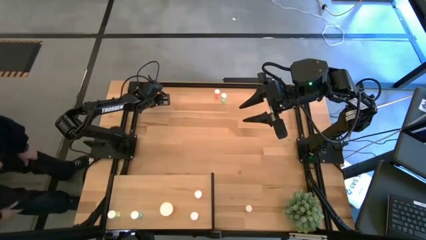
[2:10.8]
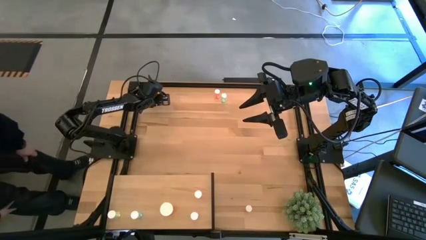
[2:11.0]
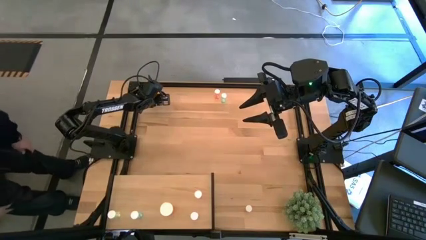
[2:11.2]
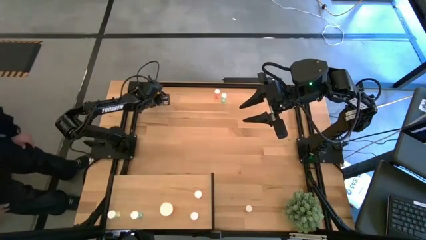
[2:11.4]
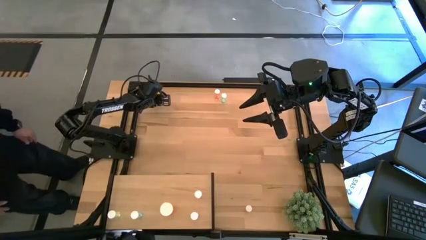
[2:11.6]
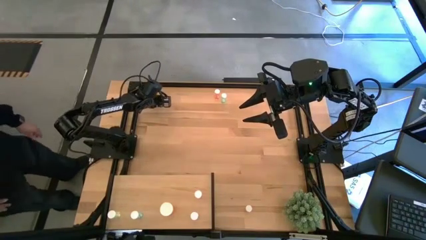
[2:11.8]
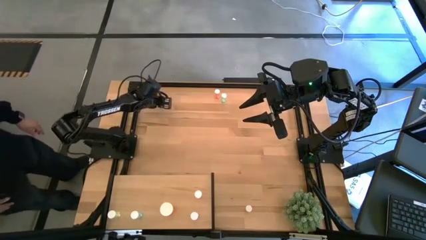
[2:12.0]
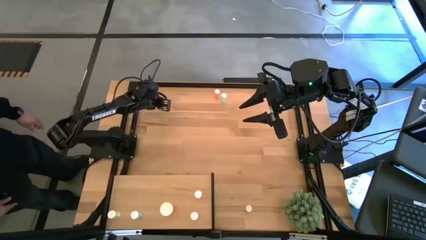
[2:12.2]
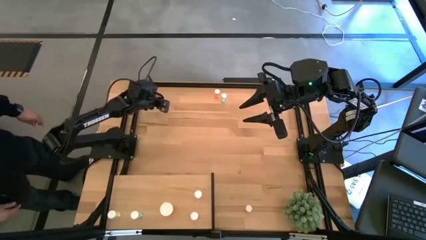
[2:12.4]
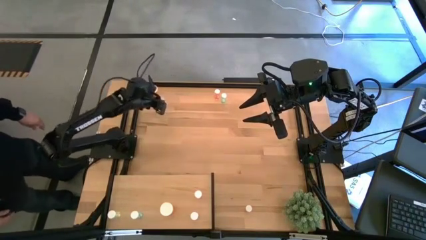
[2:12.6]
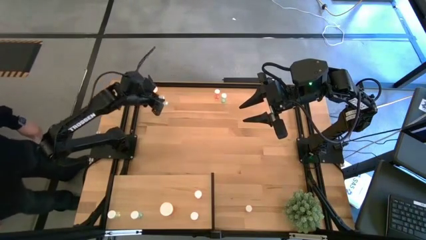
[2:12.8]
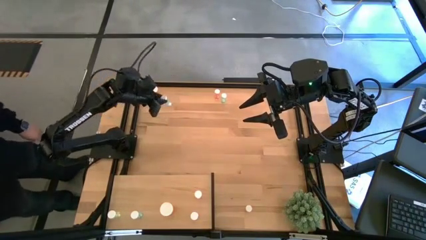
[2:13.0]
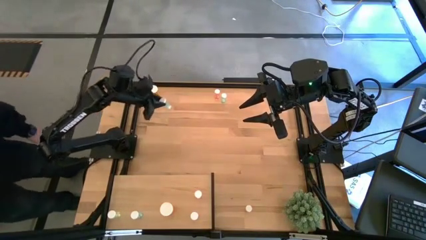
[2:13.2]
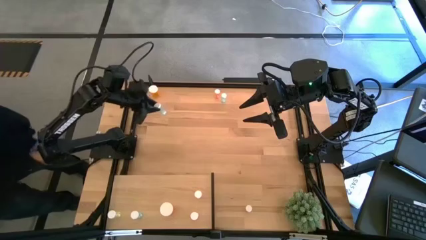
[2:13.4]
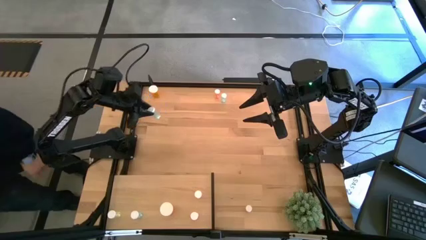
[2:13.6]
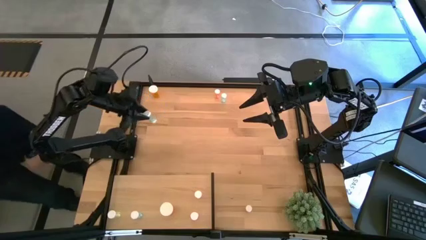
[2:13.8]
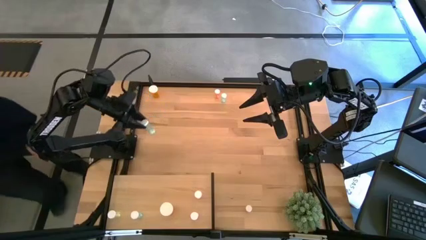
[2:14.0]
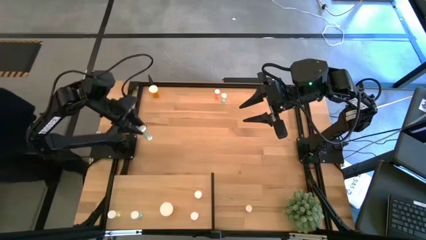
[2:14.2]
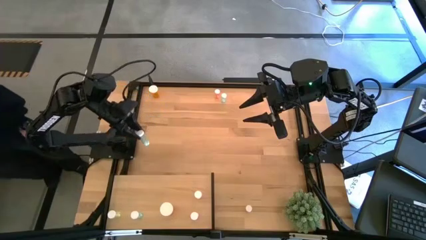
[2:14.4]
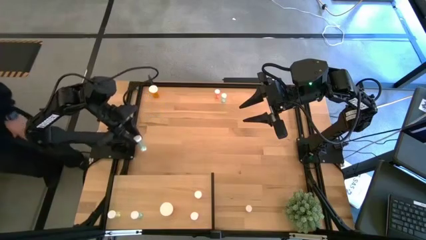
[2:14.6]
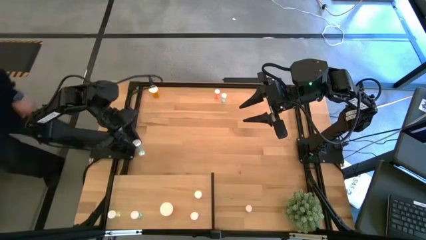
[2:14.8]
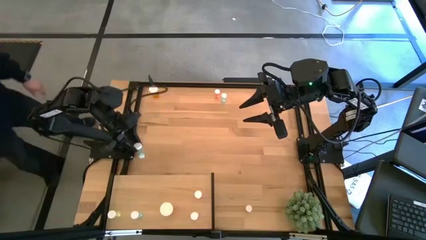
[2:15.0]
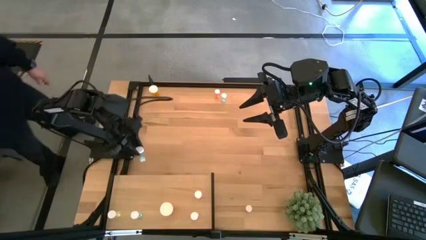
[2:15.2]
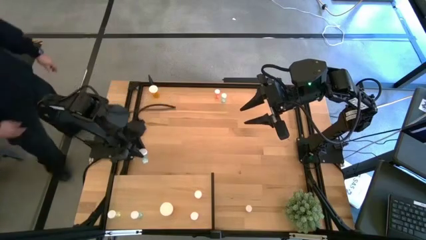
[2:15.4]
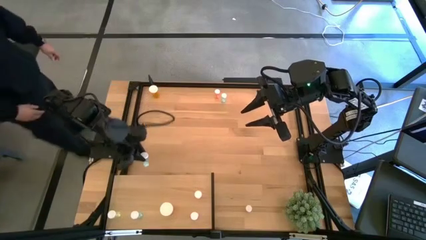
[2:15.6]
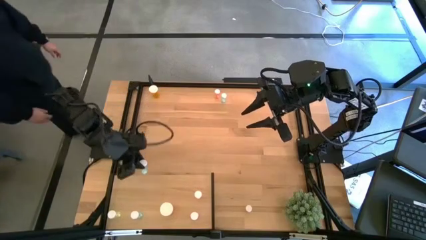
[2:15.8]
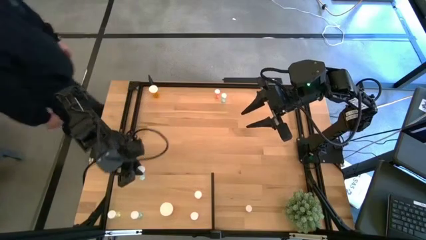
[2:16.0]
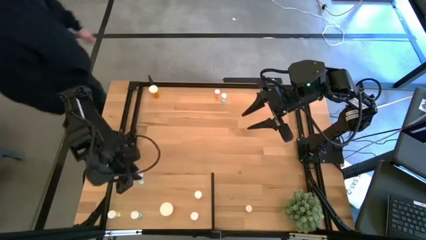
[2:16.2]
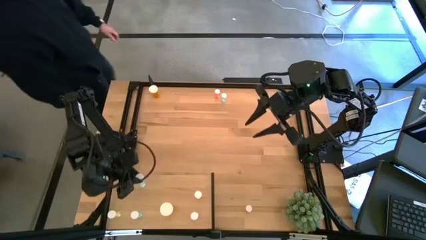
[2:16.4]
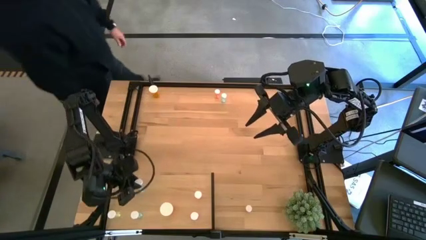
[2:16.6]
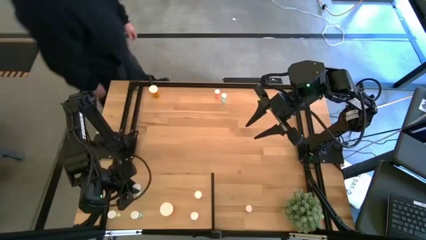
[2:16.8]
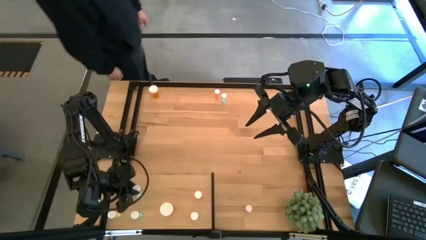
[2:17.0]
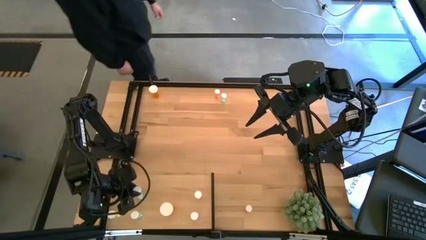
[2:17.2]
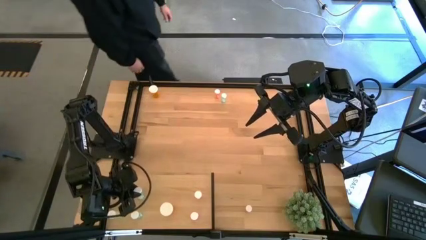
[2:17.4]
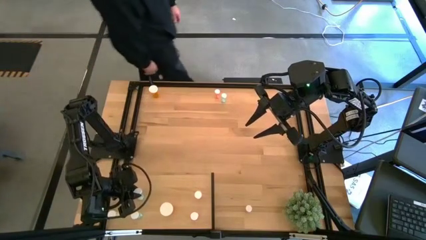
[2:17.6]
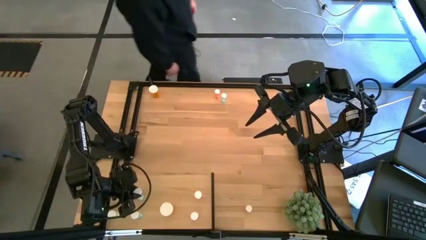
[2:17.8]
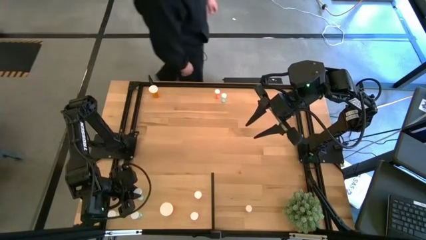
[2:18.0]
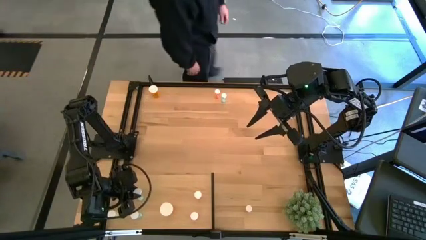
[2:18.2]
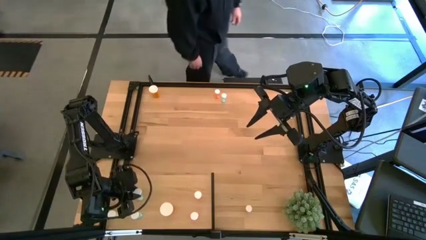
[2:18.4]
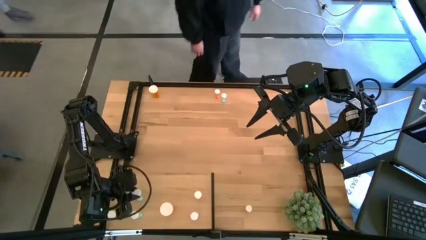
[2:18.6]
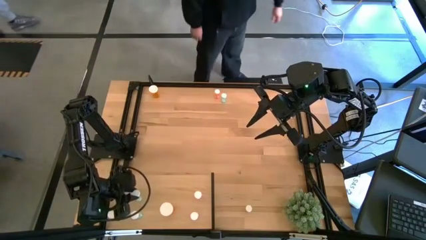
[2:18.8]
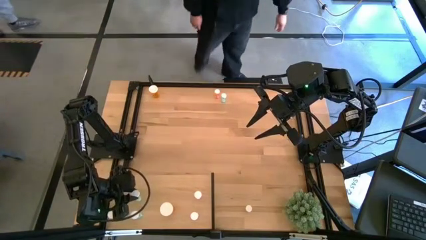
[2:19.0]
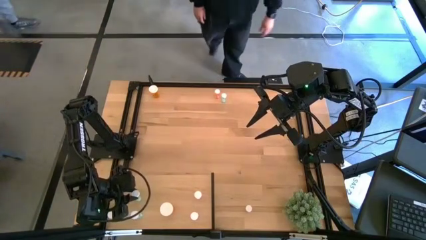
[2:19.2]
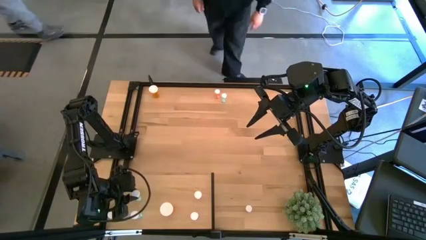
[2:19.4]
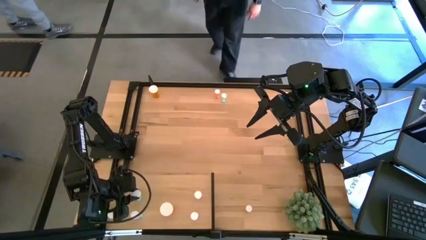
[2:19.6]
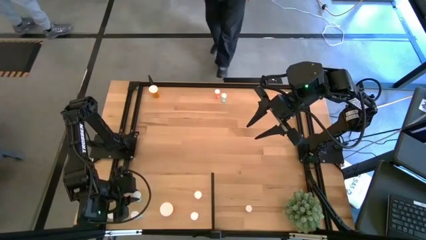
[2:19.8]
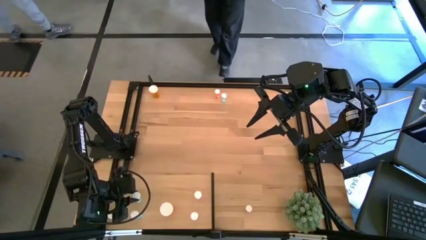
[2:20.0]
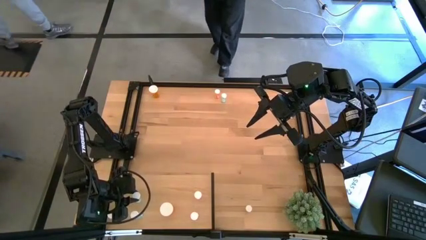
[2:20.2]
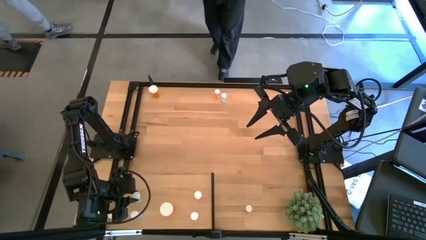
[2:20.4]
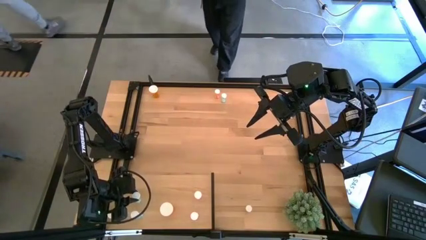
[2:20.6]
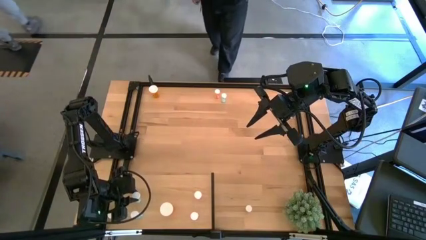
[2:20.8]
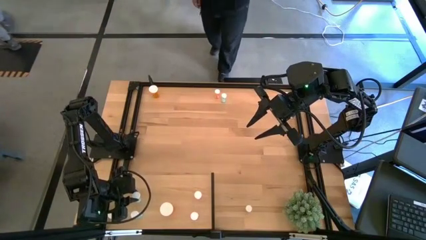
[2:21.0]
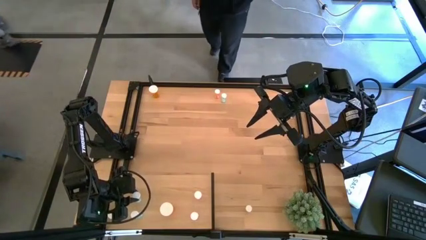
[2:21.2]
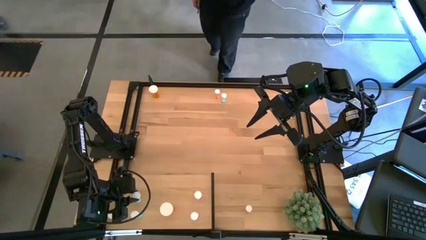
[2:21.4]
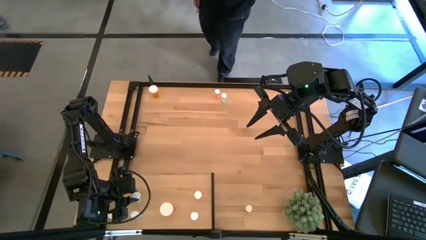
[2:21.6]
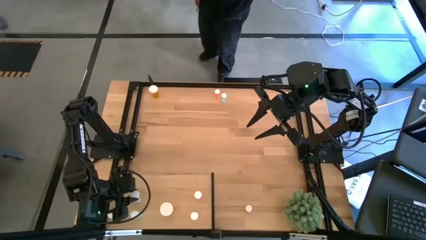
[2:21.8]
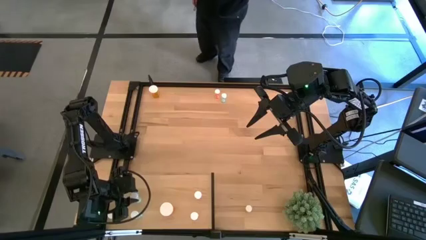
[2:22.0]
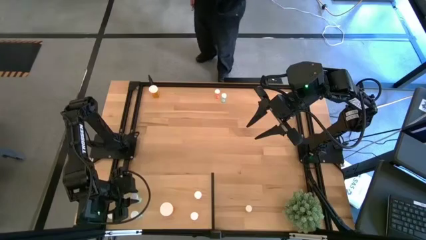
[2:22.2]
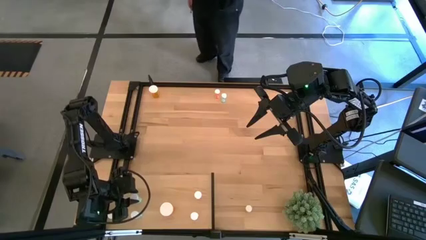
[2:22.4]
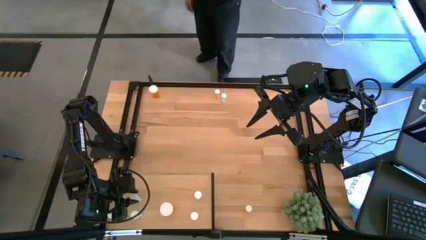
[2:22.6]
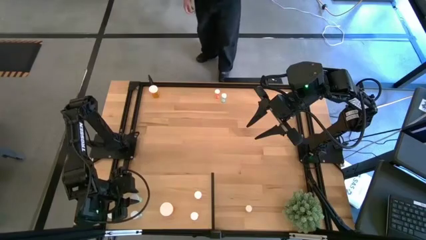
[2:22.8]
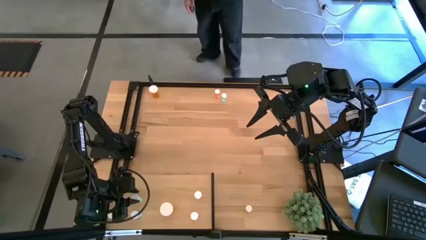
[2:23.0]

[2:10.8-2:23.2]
Task: Pick and place medicine bottles onto shelf by color
Put the top left blue pill bottle on the shelf aligned with the other blue pill bottle

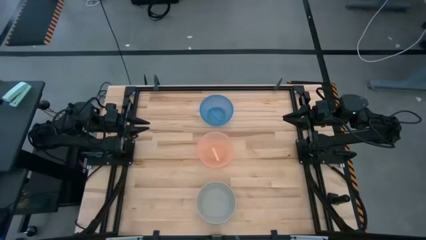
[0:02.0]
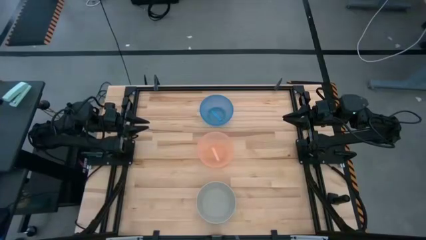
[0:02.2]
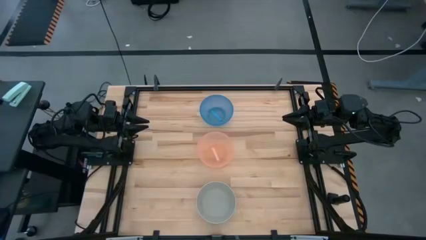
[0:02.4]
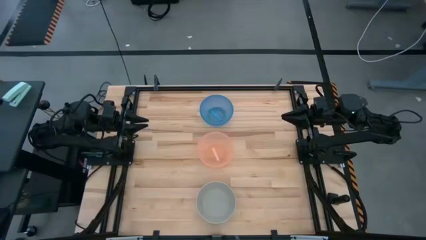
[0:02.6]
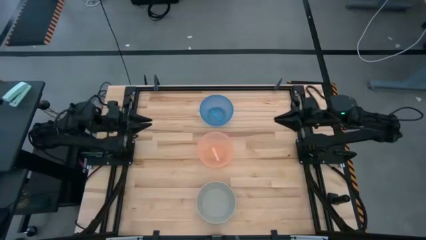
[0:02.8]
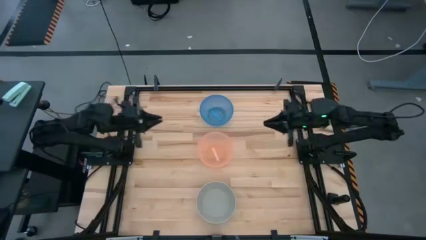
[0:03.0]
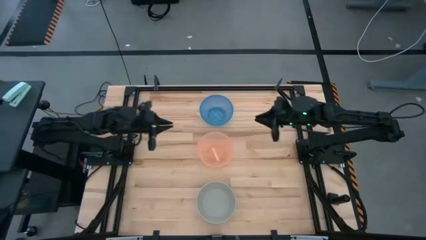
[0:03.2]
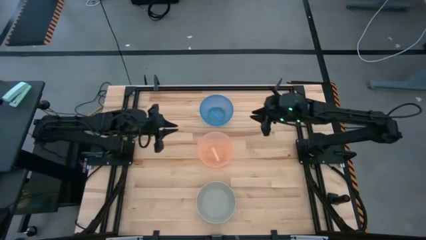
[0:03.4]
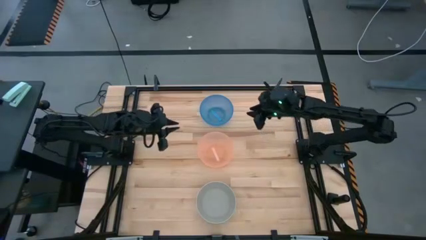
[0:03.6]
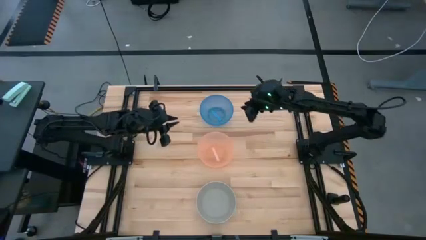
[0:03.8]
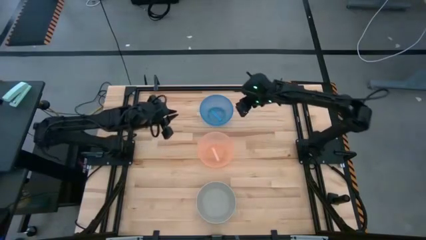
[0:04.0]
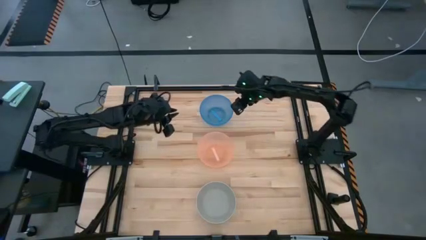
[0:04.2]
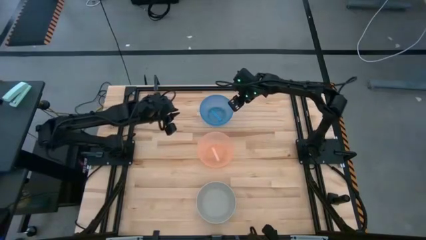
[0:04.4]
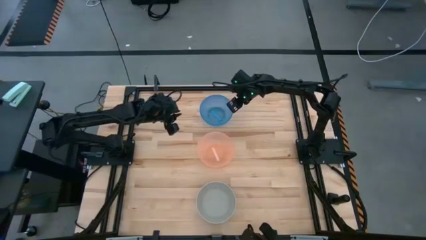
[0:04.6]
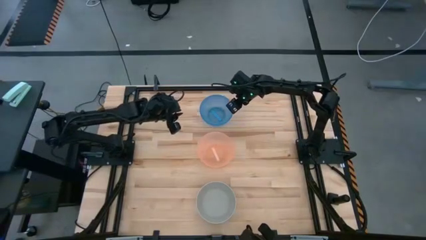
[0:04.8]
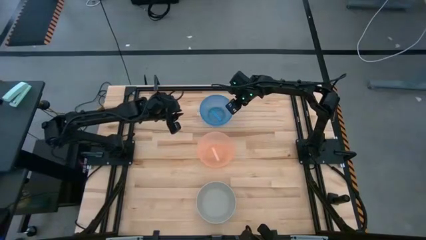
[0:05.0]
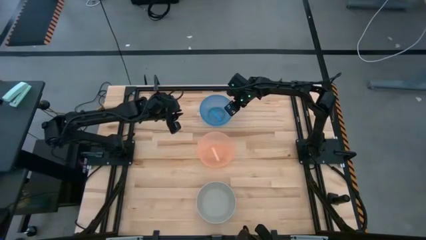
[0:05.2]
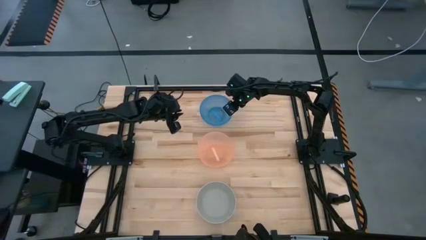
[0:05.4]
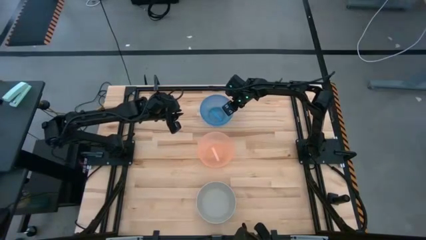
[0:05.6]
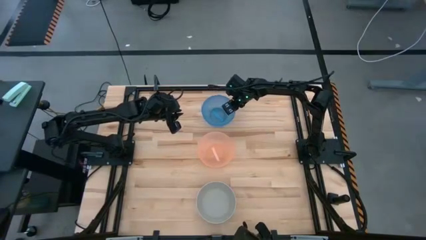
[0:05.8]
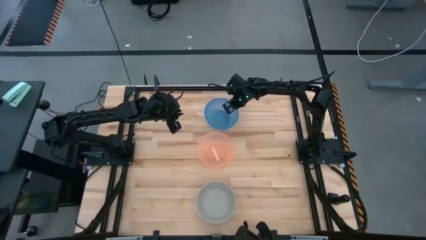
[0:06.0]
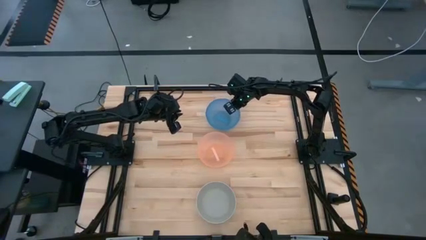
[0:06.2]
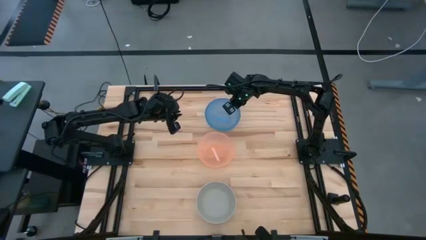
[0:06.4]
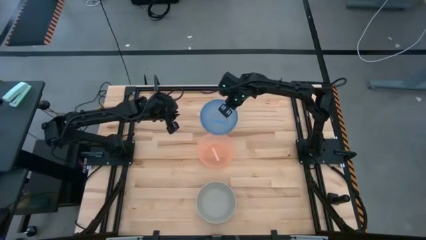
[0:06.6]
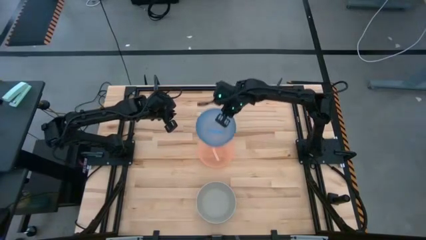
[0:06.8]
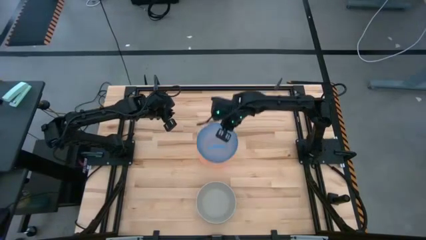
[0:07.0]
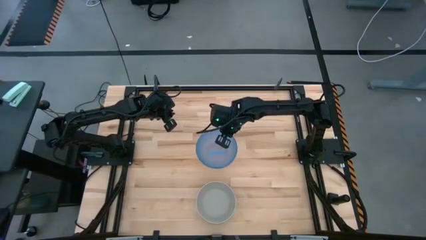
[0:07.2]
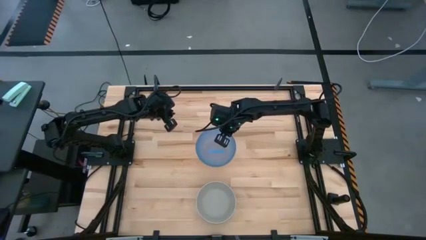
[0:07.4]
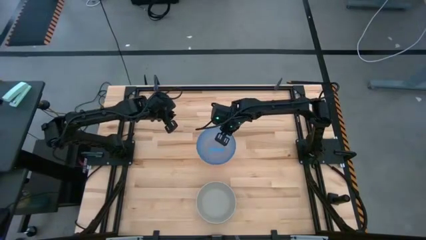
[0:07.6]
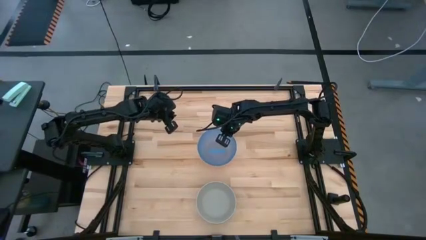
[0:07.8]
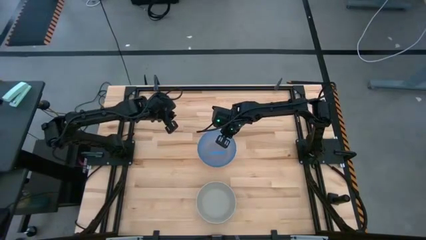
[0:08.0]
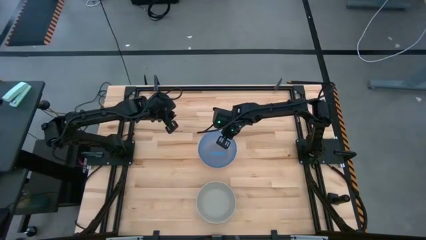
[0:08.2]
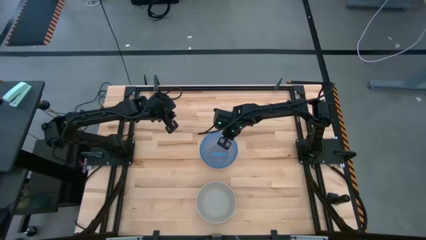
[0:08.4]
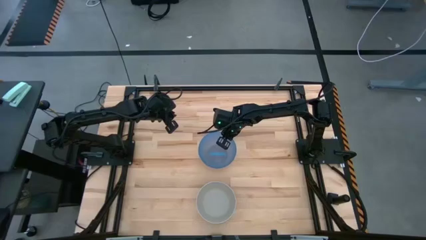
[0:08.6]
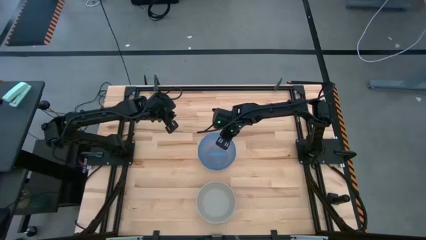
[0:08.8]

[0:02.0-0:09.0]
Task: Nest bowls inside each other
Stack the blue bowl on top of the pink bowl
